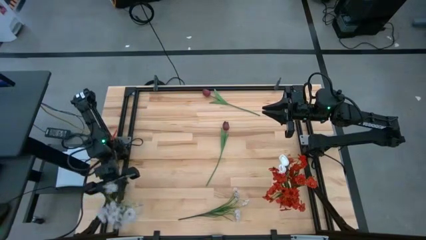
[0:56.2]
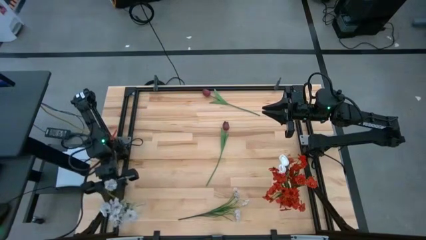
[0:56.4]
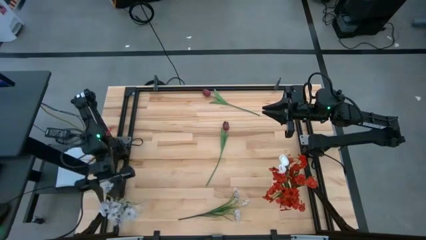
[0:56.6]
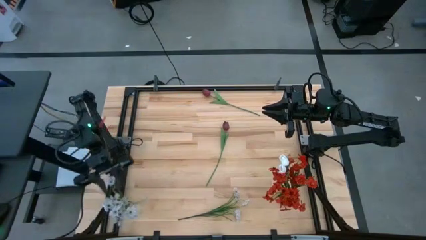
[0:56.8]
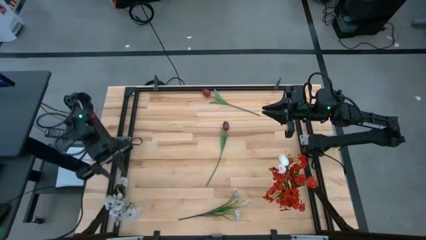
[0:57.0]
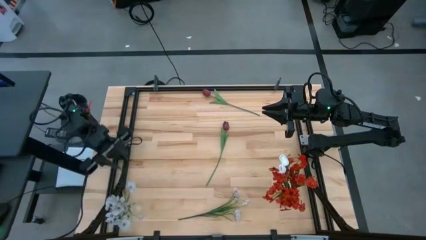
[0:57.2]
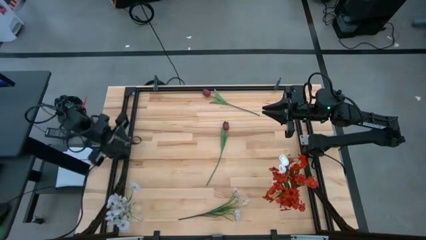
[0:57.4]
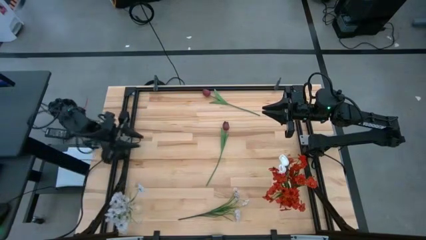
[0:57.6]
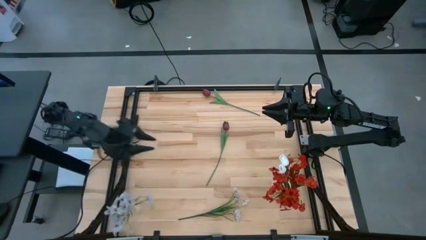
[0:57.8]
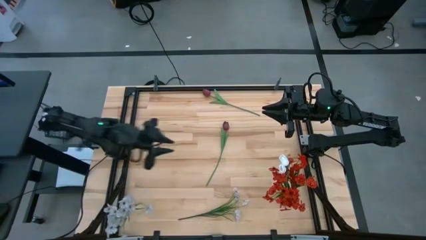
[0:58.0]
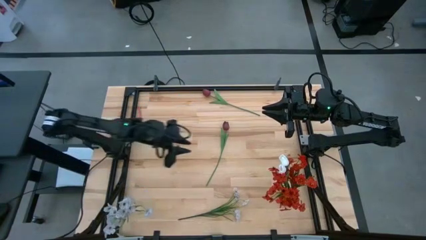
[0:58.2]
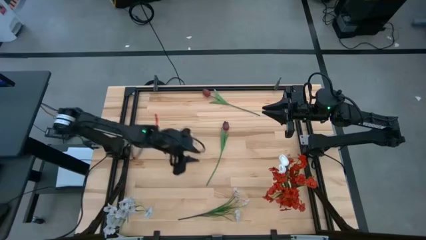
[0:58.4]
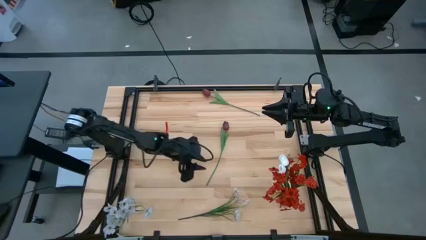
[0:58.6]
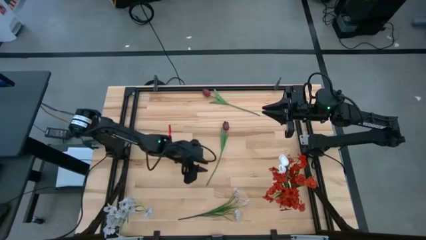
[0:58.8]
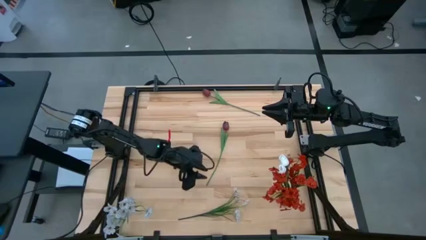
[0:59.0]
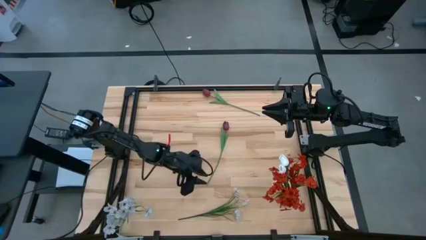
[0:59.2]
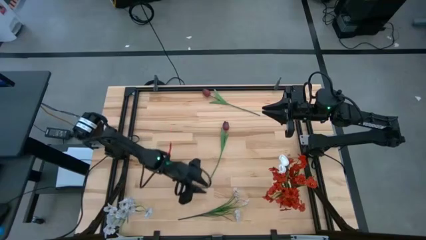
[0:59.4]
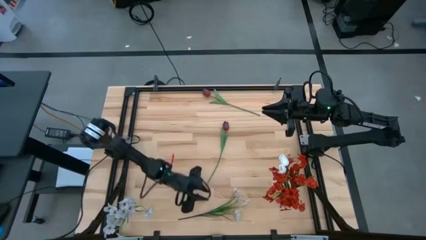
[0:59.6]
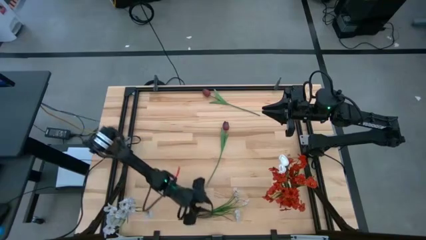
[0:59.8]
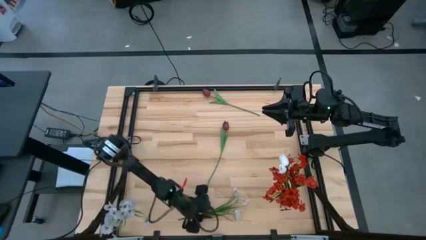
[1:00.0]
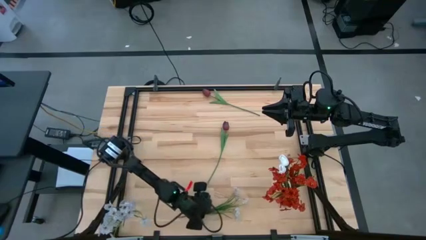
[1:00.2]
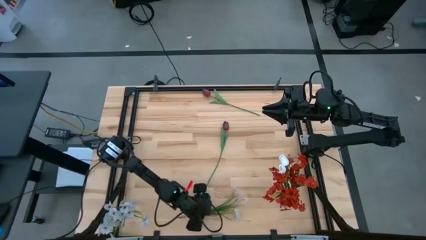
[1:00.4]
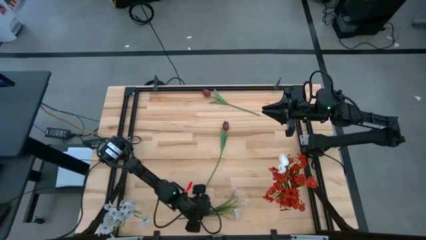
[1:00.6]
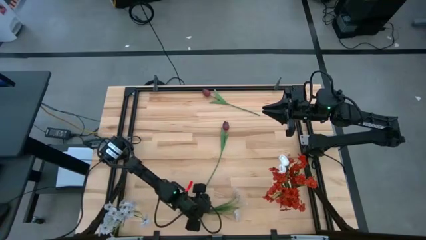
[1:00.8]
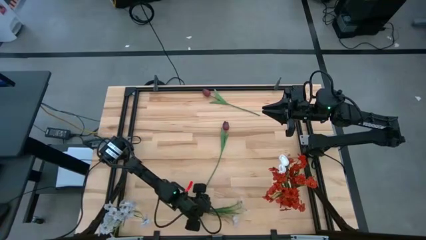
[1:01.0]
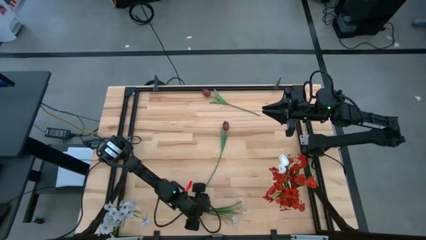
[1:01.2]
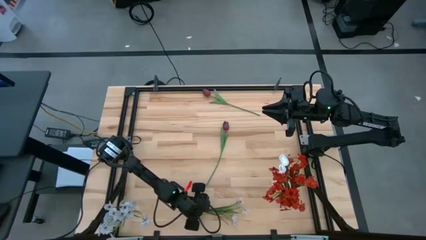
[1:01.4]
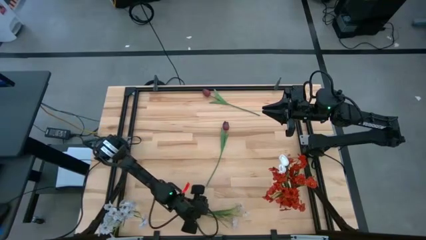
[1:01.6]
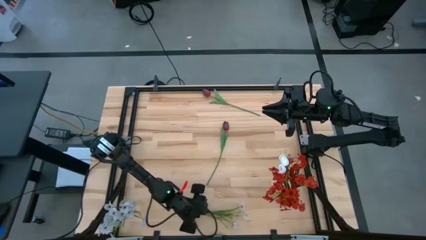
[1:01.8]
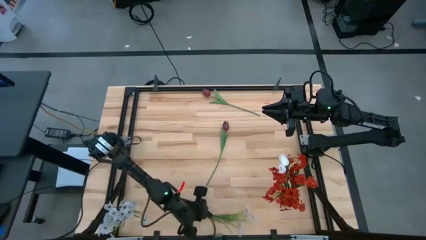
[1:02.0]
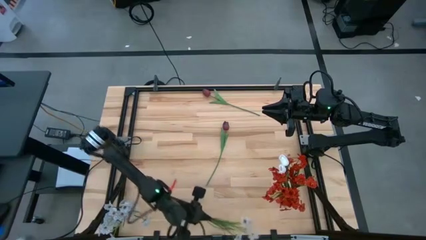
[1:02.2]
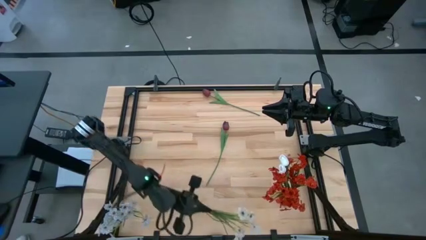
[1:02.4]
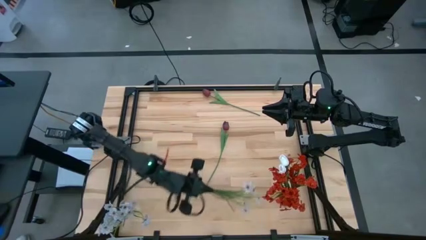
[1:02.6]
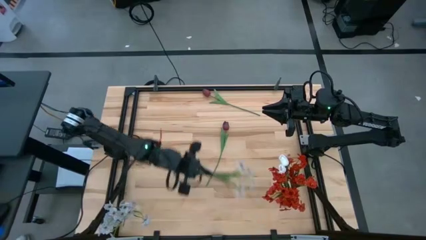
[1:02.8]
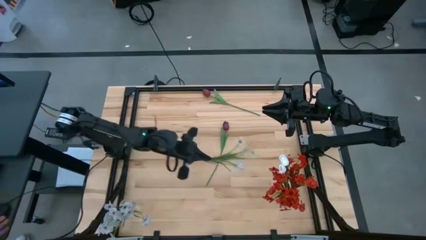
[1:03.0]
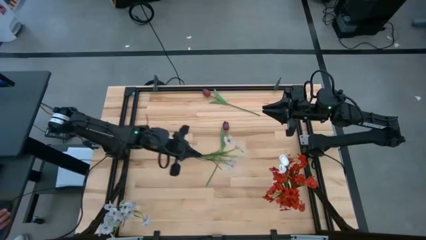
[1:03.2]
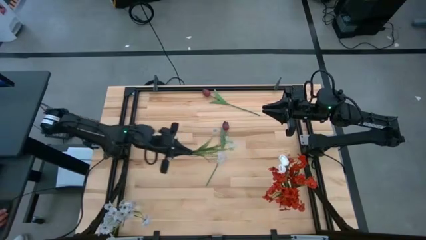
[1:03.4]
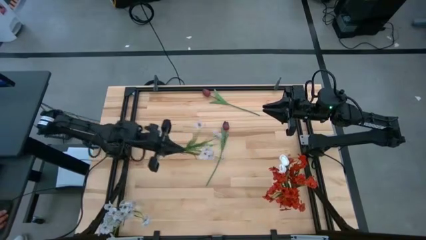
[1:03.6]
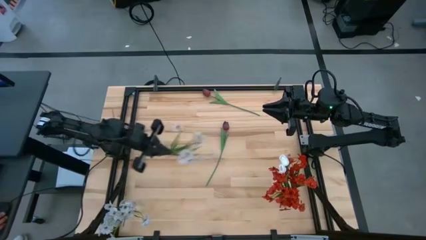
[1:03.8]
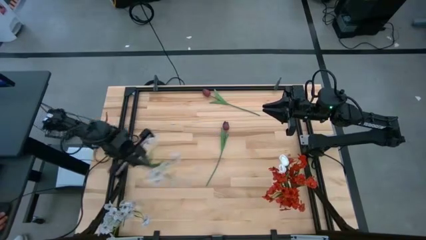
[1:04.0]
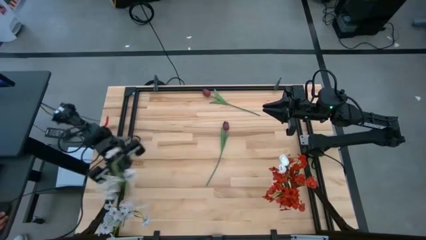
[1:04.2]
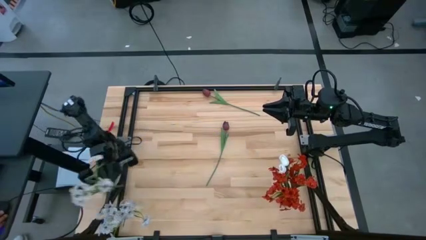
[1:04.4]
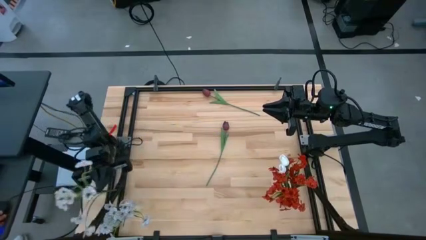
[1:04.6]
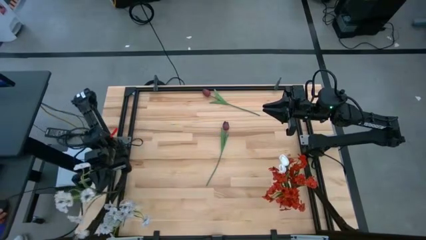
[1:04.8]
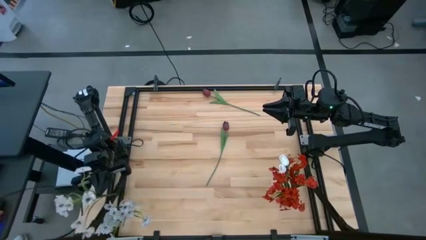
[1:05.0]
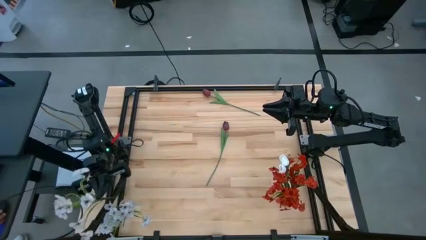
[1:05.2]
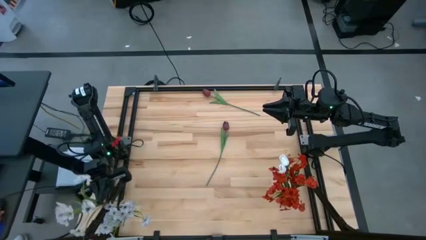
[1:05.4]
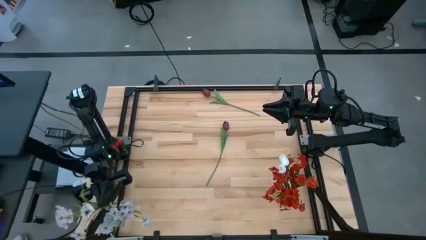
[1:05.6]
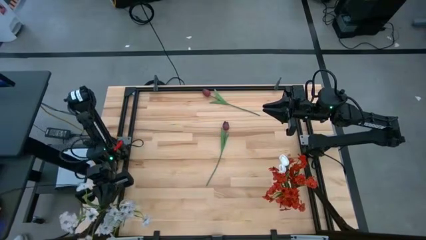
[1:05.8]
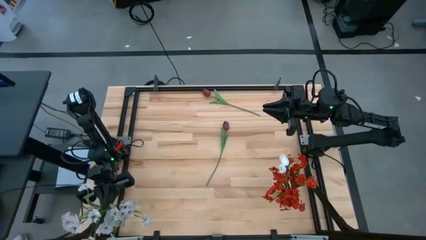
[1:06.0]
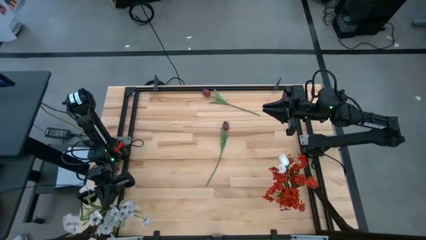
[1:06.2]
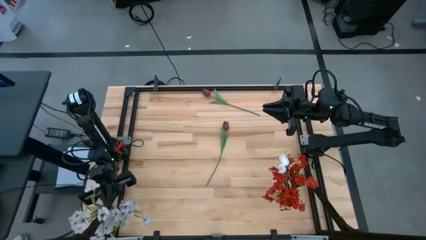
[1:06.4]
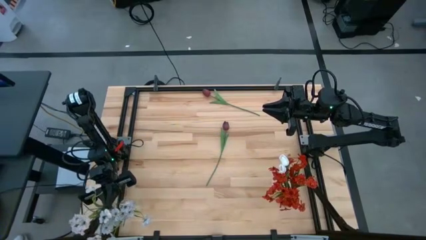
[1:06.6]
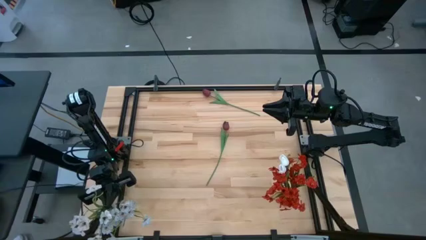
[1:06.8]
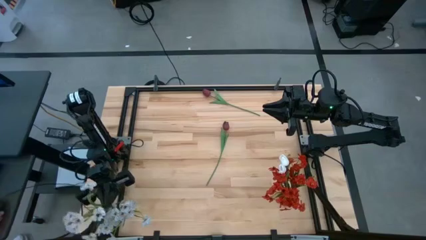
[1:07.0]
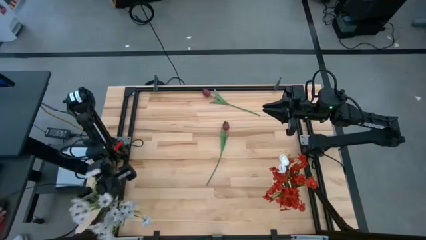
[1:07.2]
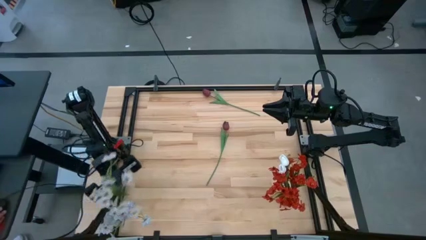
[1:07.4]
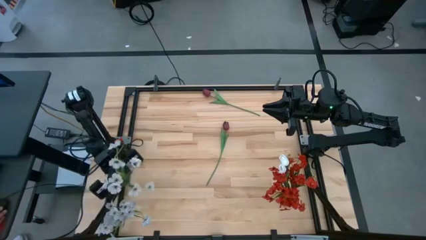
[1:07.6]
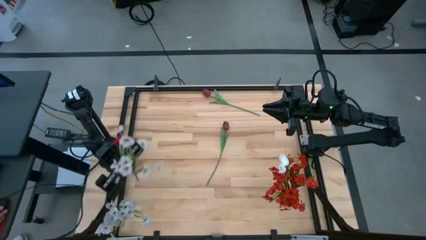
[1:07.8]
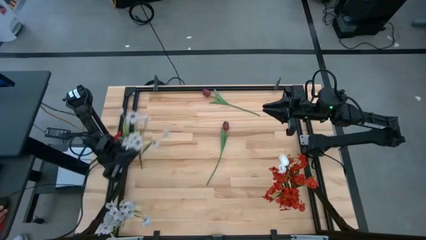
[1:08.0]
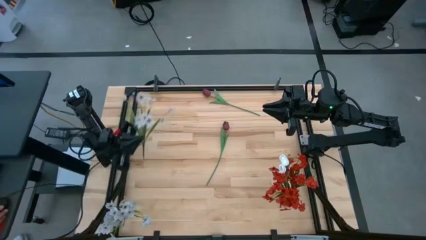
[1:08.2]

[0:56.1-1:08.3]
Task: Sort flowers into vase by color
Put the white flowers into the transparent vase

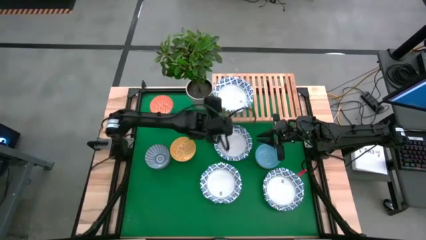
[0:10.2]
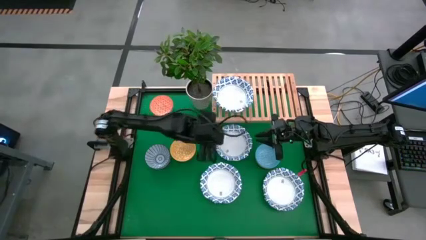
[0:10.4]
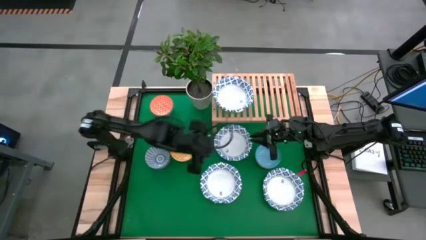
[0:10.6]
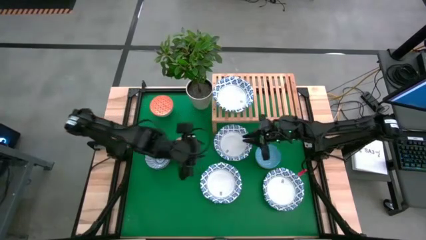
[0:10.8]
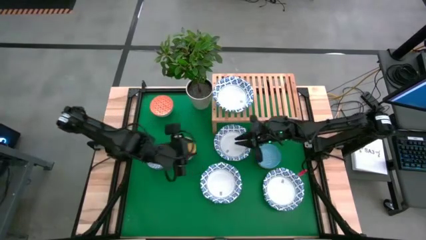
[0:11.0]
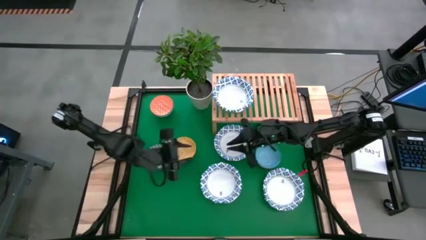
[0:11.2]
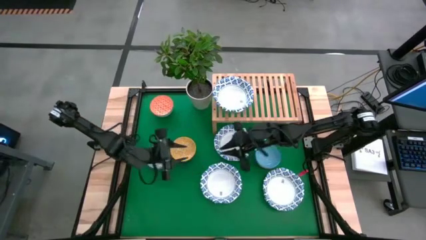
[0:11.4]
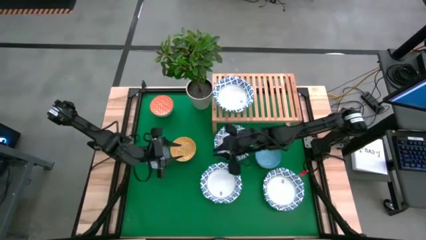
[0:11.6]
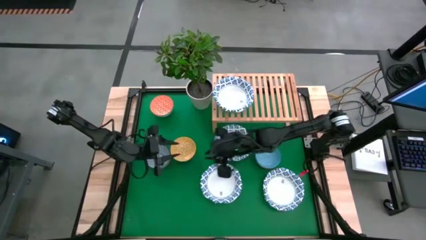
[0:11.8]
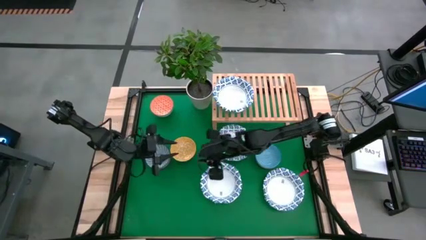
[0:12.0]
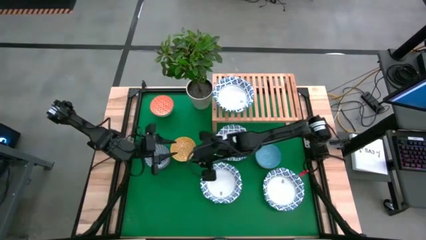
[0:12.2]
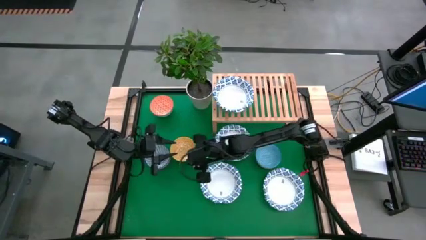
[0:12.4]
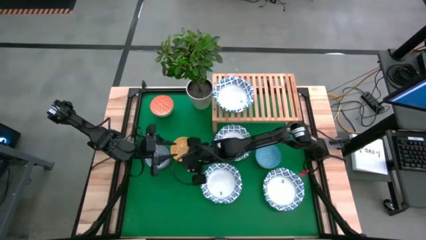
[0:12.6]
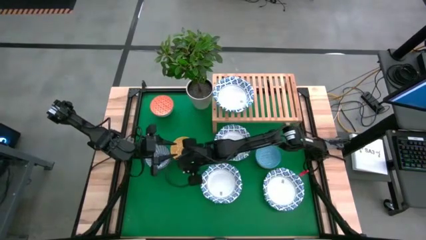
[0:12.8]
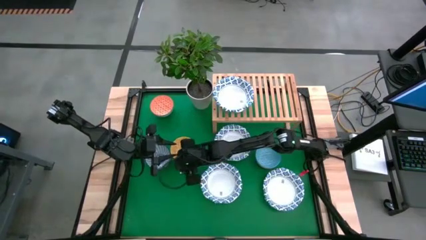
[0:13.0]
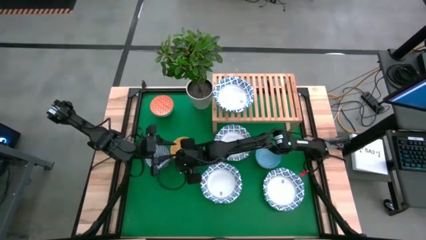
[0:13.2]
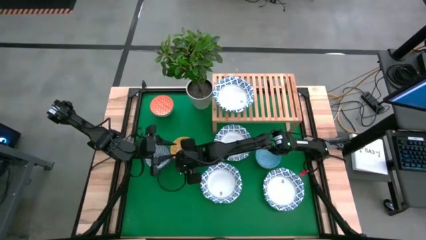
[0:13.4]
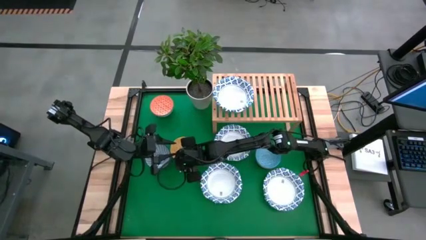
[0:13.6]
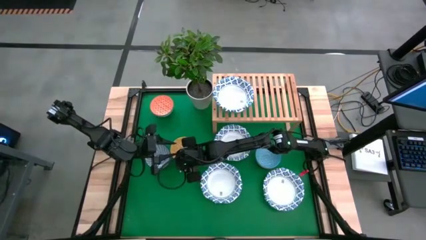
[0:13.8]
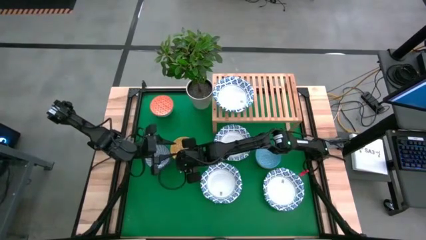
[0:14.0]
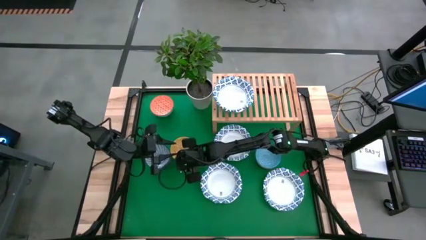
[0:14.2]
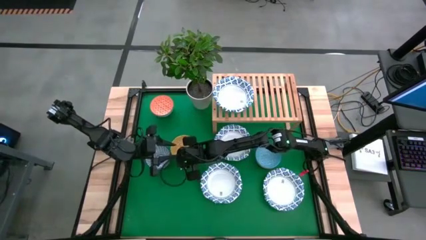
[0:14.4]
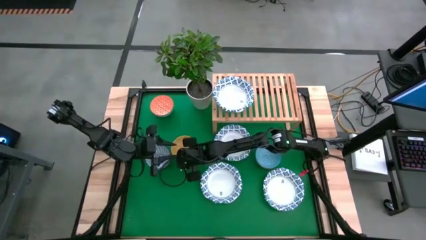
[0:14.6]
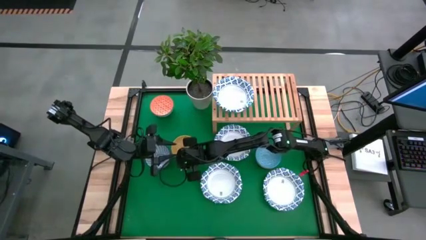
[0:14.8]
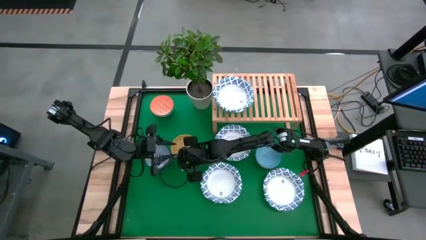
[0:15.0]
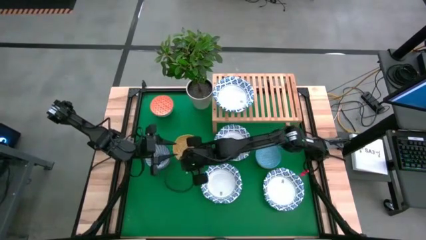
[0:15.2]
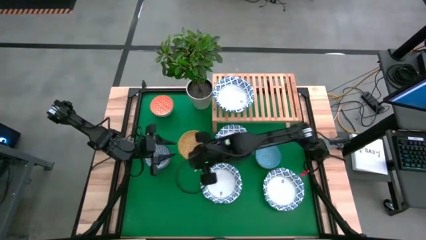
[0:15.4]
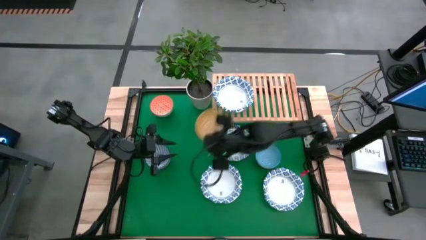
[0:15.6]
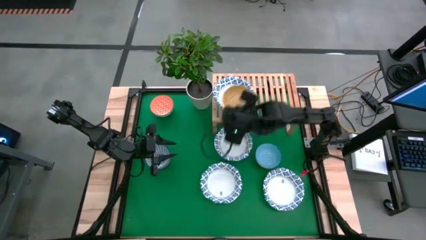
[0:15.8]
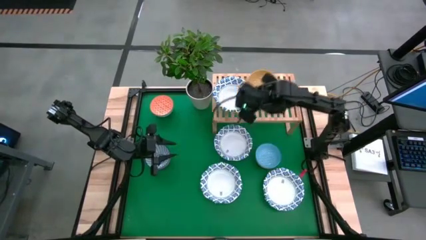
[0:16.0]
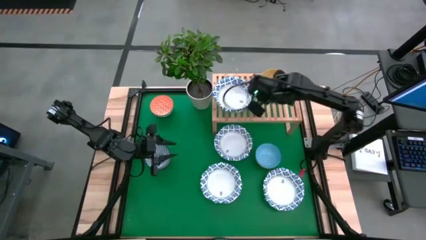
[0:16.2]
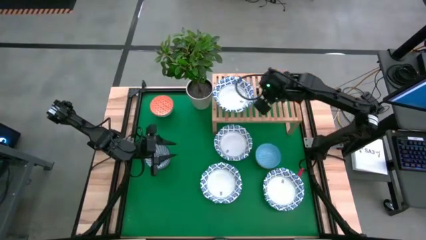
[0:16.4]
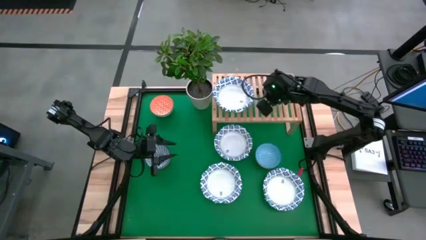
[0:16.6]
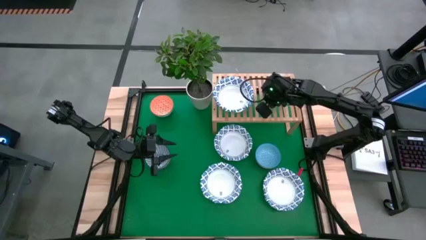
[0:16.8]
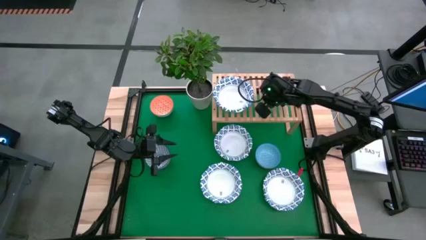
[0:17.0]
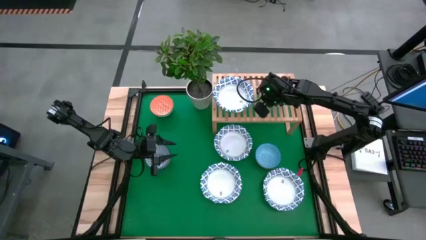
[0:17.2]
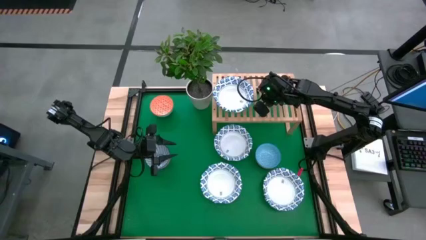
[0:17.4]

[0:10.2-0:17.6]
Task: Place and stack bowls onto a shelf
Put the yellow bowl on the shelf
